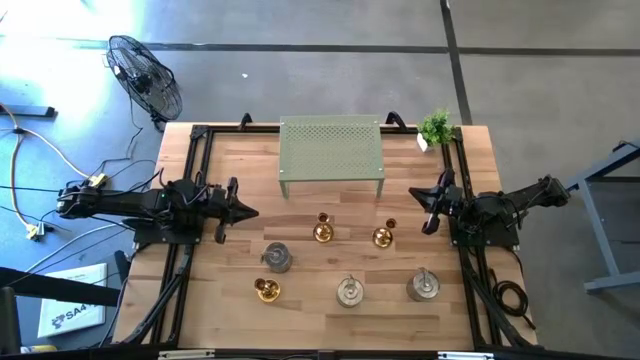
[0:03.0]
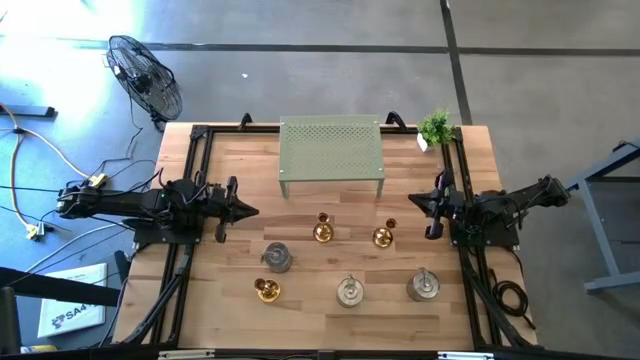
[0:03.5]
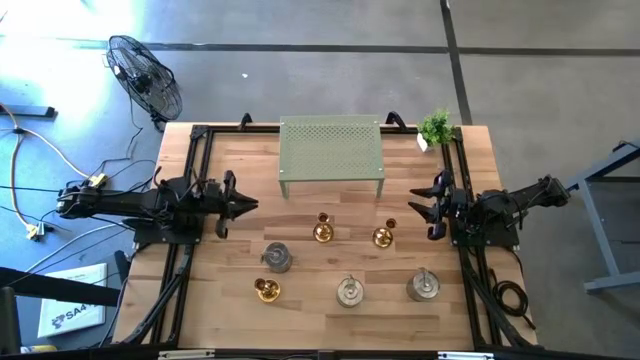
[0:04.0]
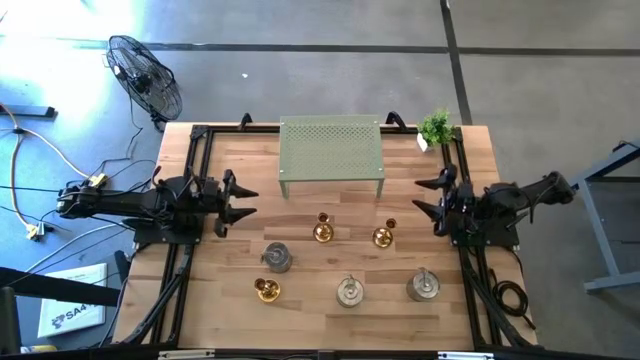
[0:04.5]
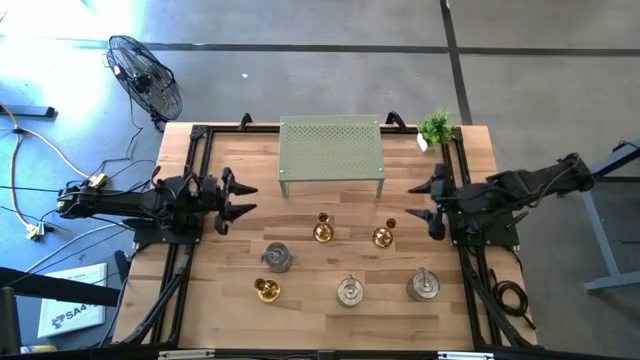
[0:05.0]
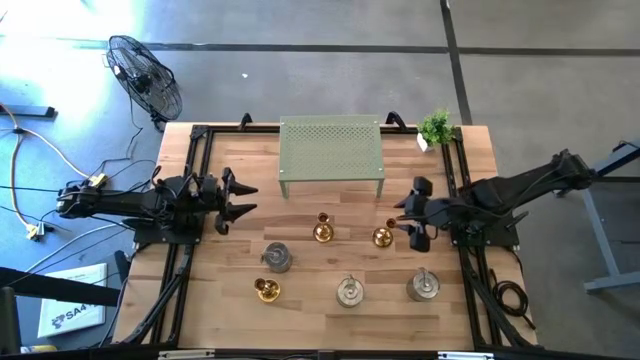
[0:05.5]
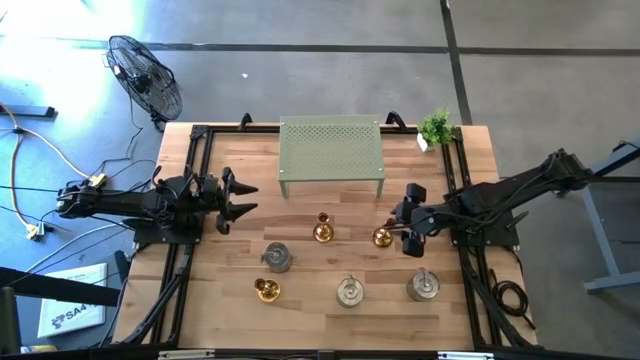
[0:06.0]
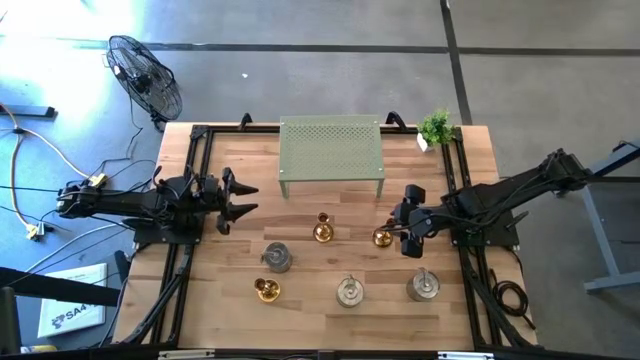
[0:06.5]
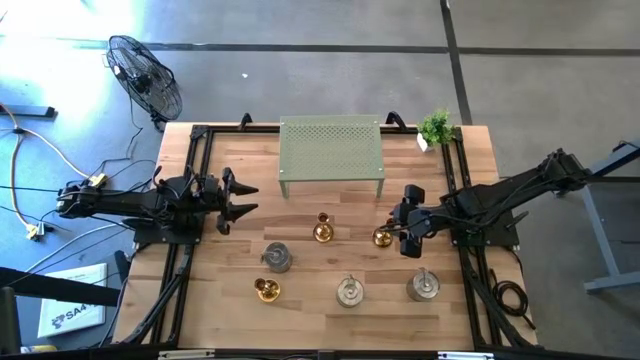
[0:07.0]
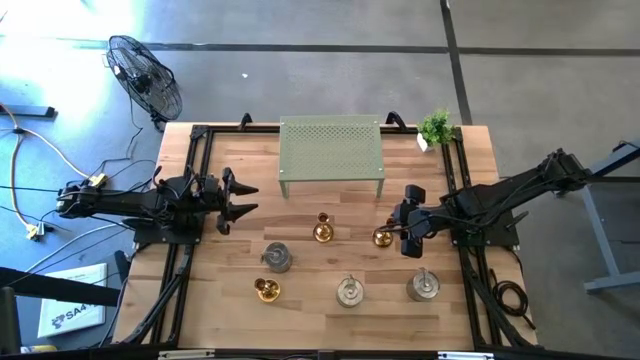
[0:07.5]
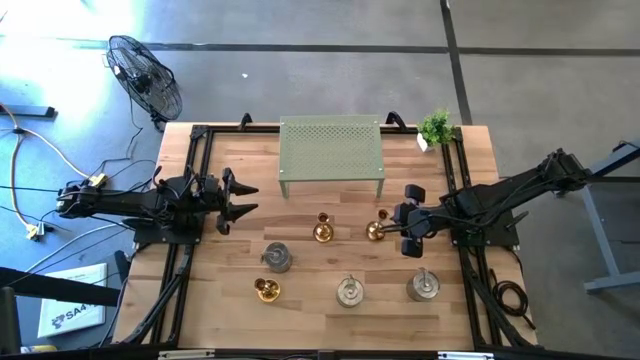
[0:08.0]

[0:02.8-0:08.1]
Task: Pick & Place candle stick holders
Put the top right gold candle holder on the shelf

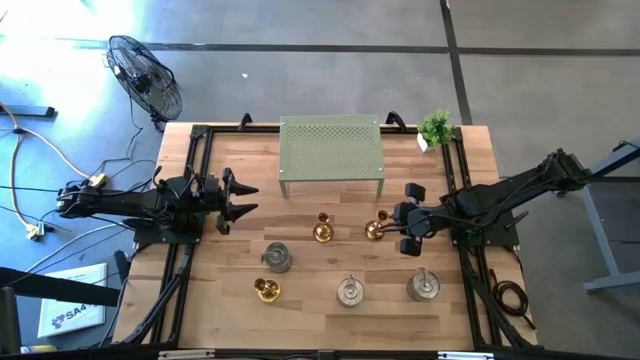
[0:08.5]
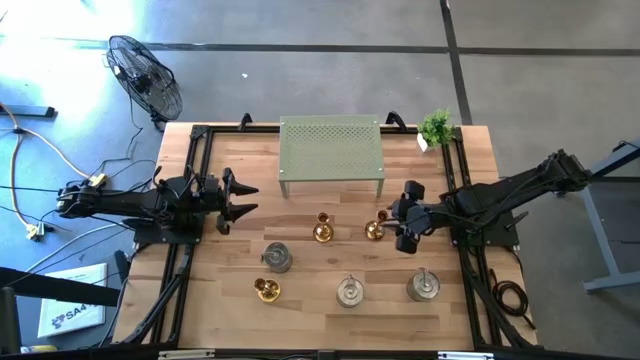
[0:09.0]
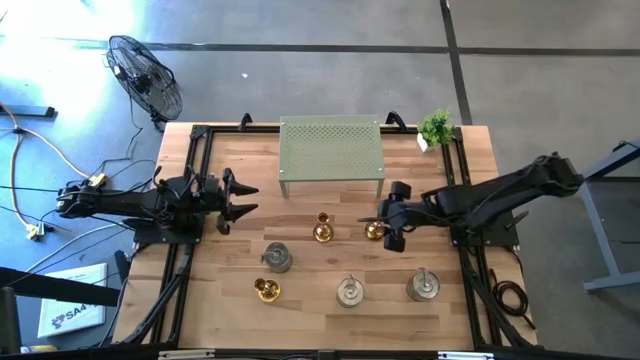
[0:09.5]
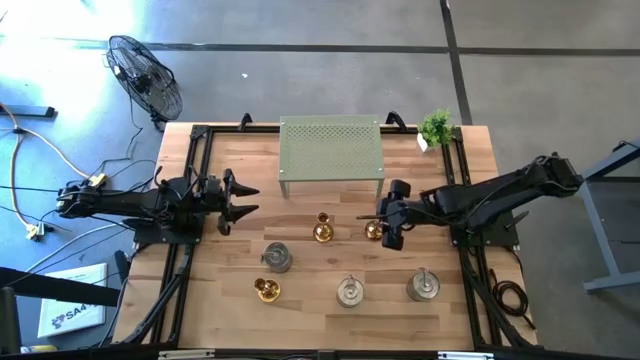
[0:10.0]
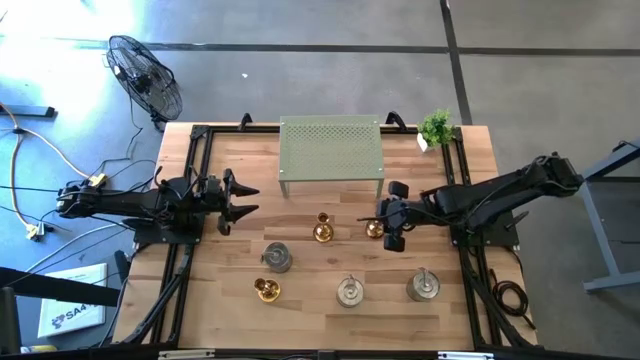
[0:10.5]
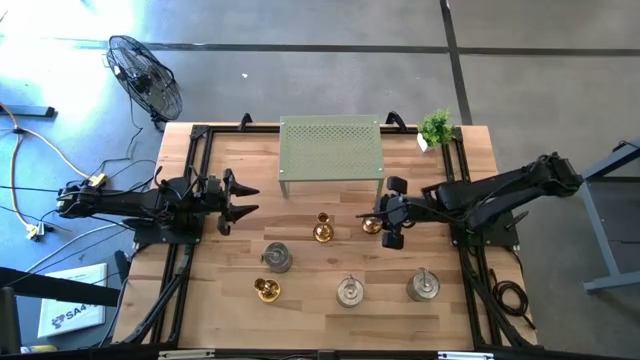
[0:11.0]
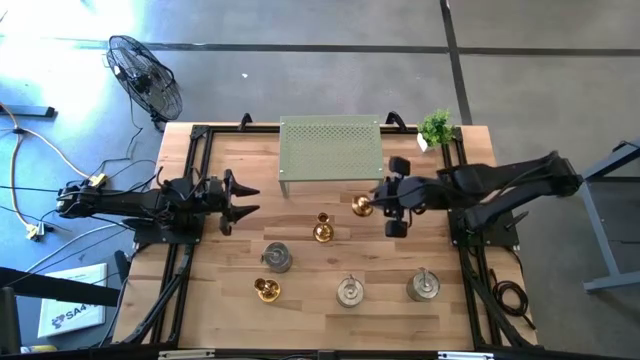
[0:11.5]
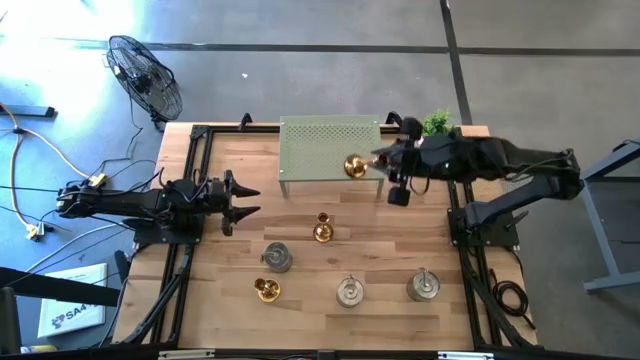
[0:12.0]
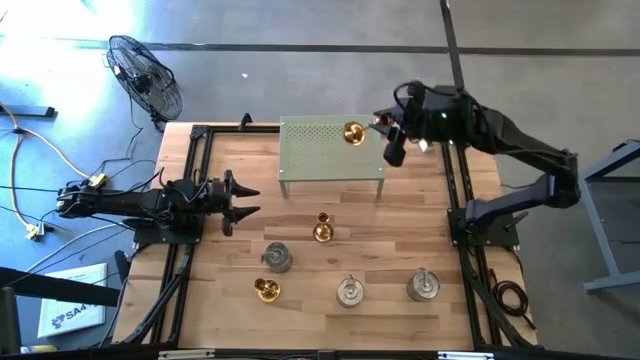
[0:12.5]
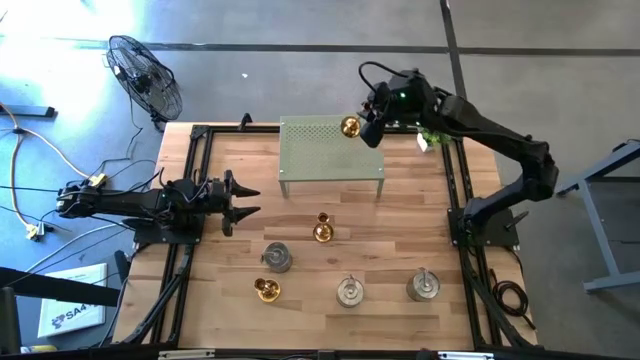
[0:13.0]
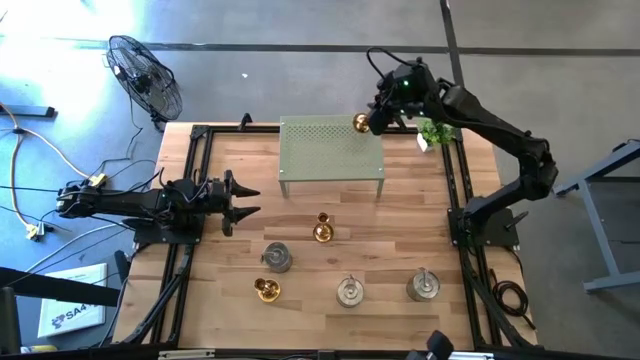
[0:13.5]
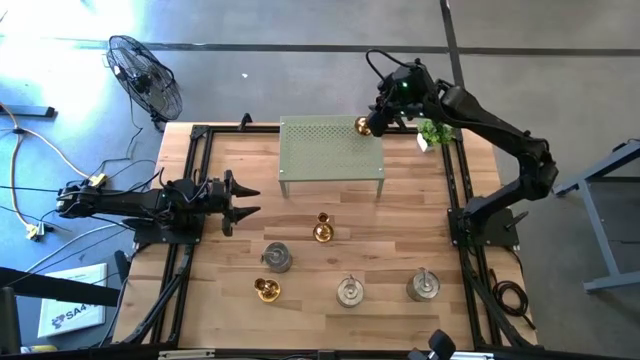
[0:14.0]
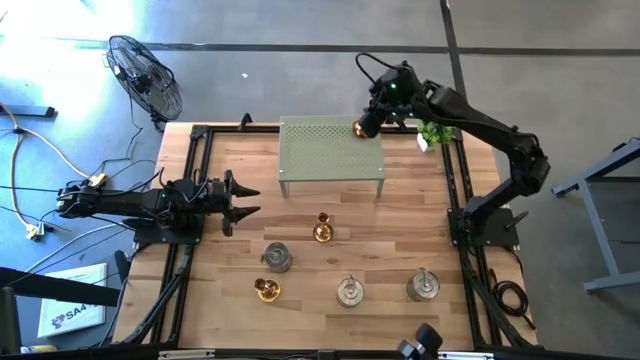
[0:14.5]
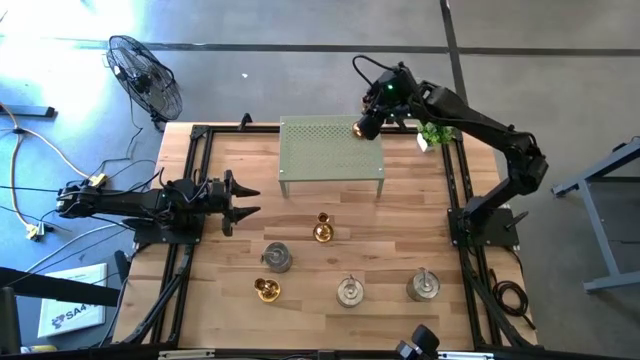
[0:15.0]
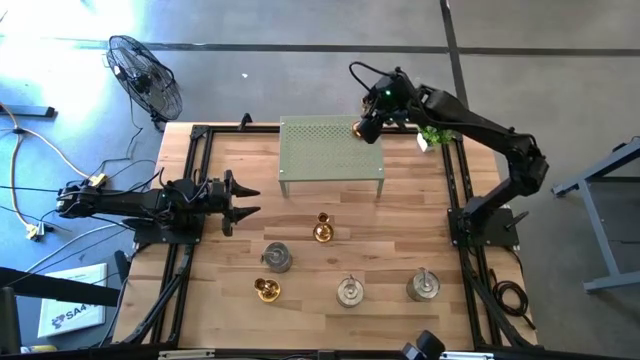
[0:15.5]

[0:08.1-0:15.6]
Put the top right gold candle holder on the shelf

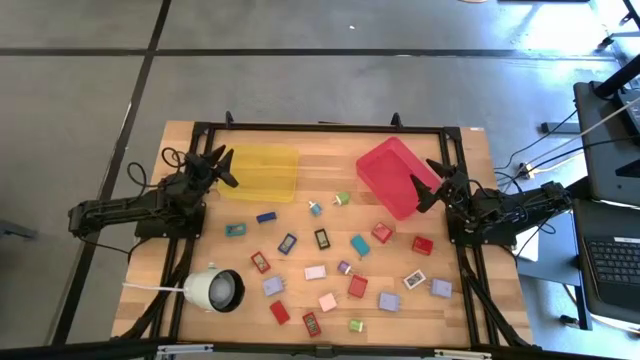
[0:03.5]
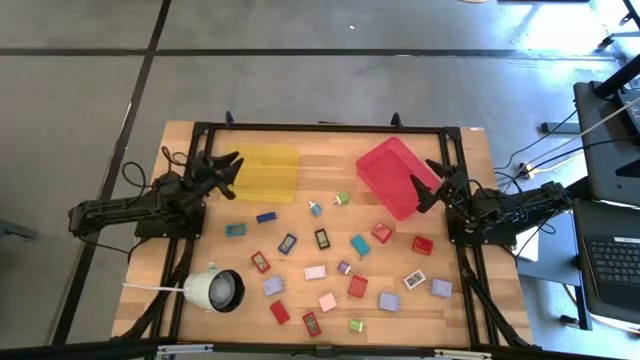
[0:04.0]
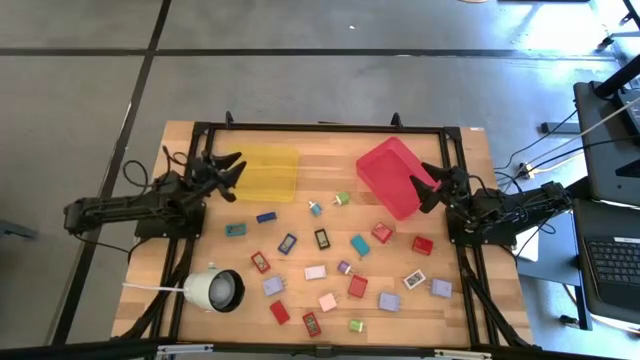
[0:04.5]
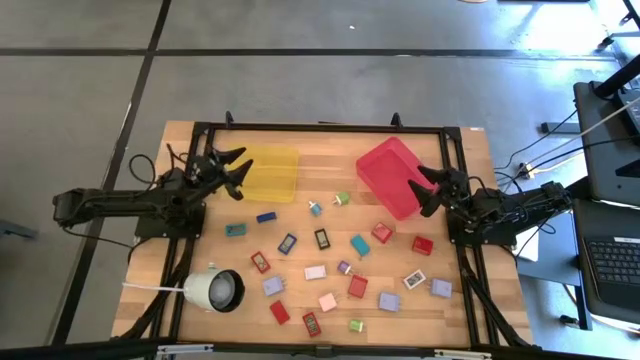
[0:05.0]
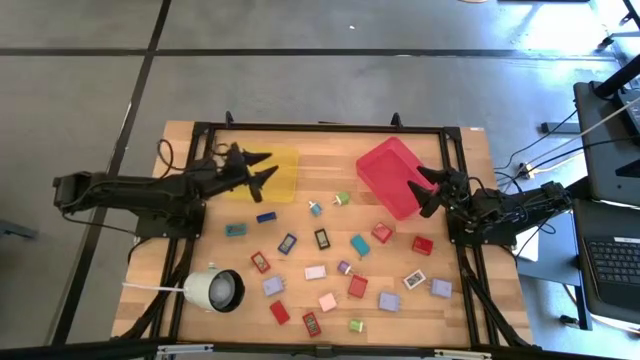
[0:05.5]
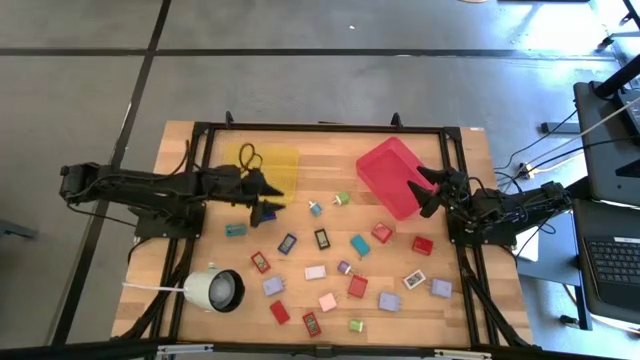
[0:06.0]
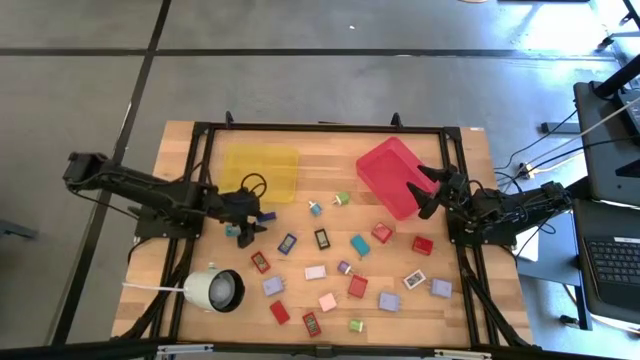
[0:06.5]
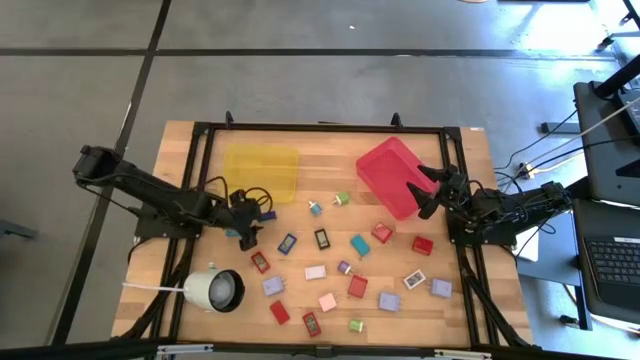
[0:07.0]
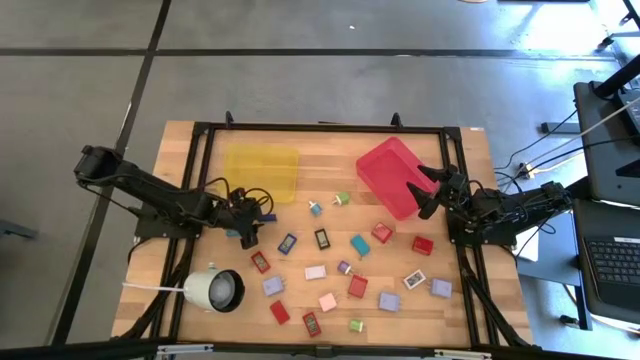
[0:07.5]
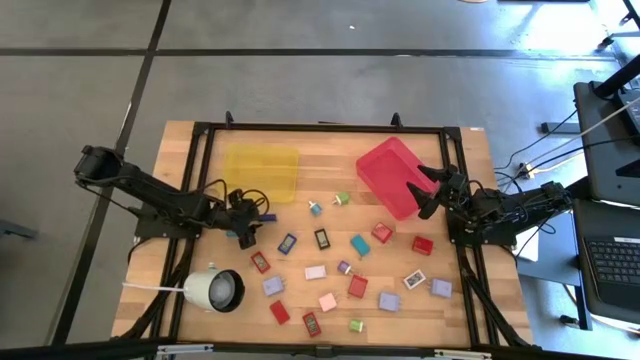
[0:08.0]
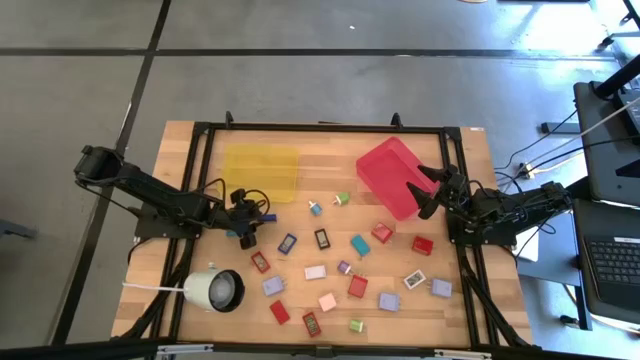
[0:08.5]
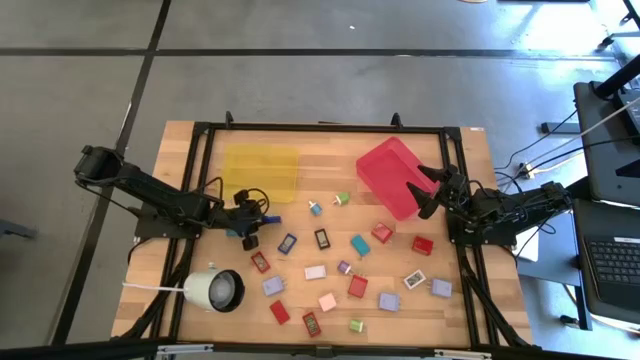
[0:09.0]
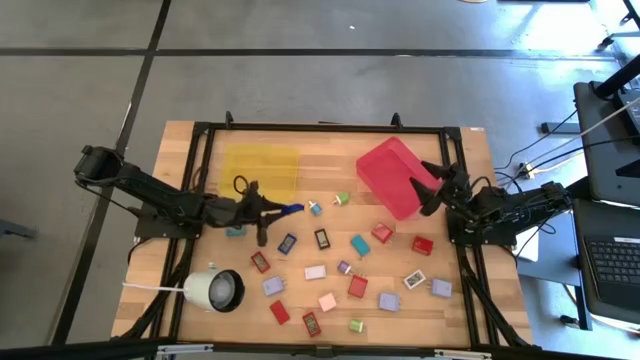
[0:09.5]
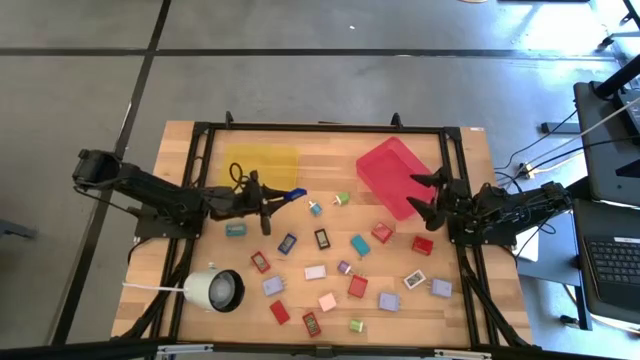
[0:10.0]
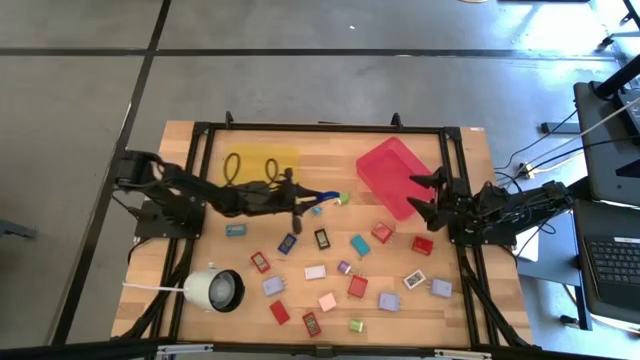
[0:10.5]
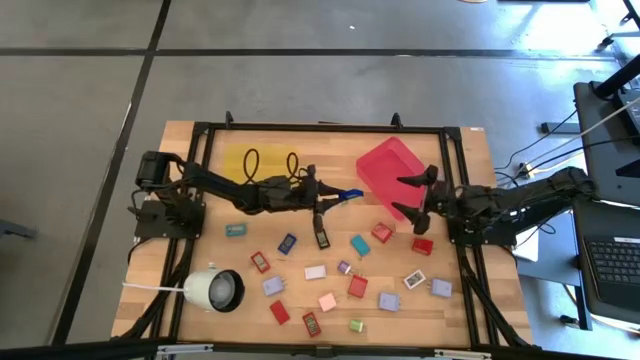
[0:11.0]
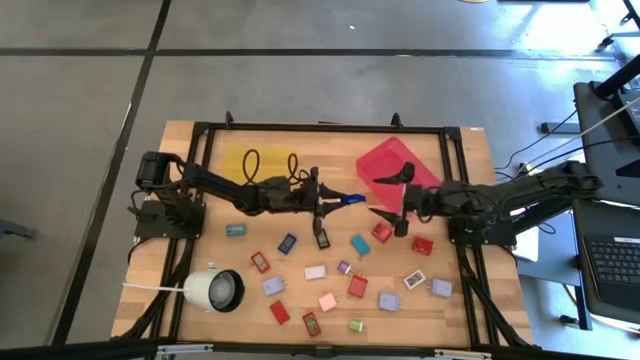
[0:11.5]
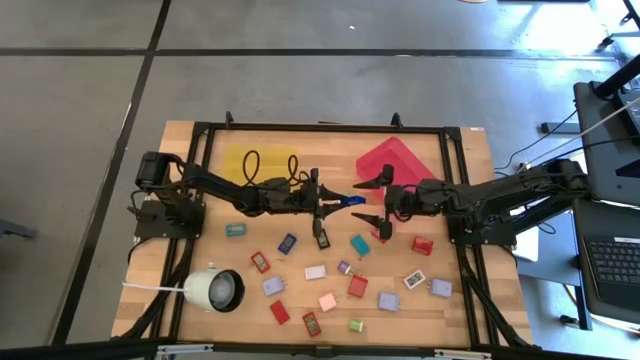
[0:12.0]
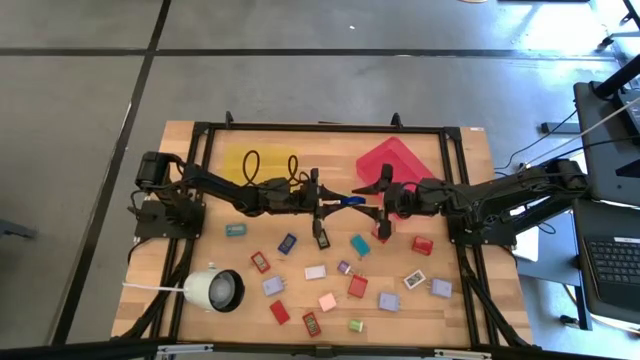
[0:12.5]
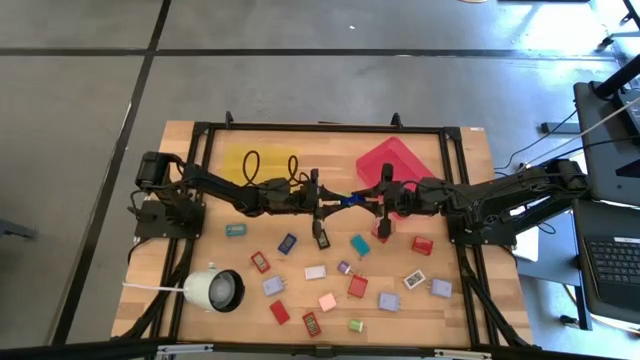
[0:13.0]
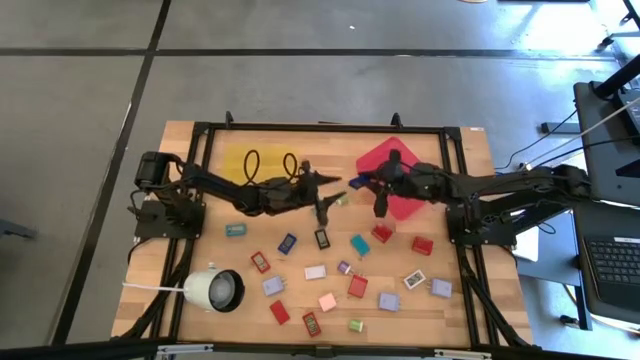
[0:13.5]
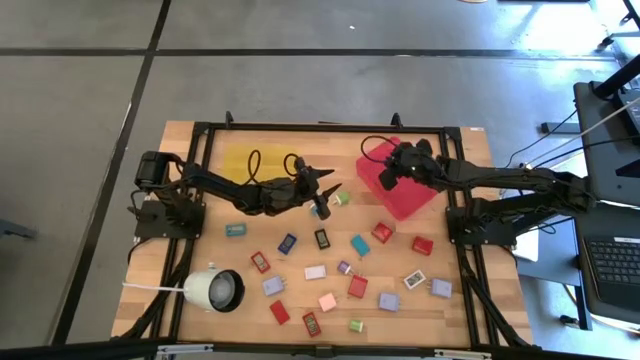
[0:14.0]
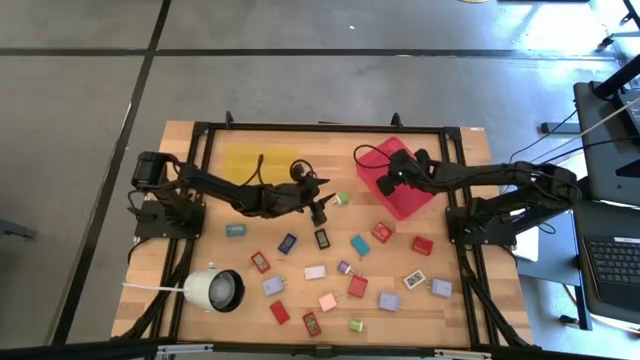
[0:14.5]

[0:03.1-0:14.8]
Task: Pick & Place Office items
Put the top blue digital clock into the pink bin
